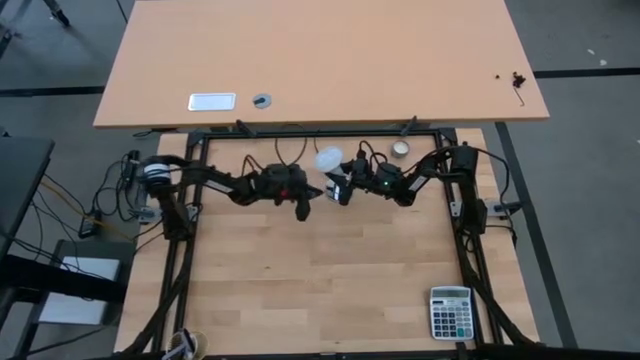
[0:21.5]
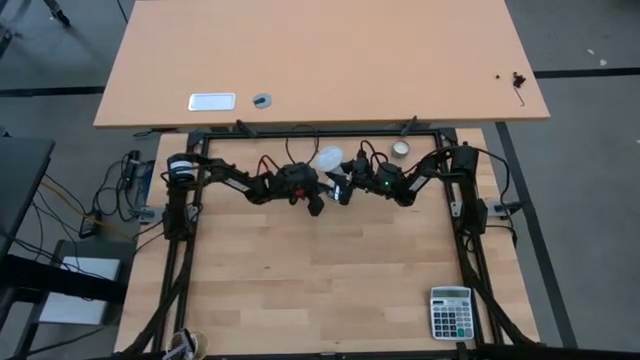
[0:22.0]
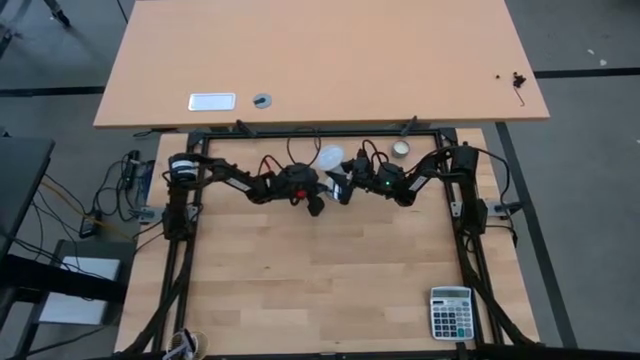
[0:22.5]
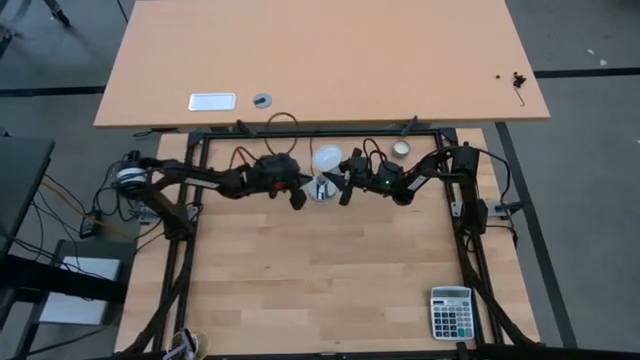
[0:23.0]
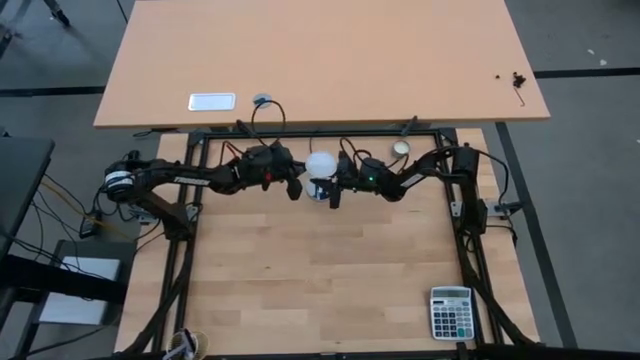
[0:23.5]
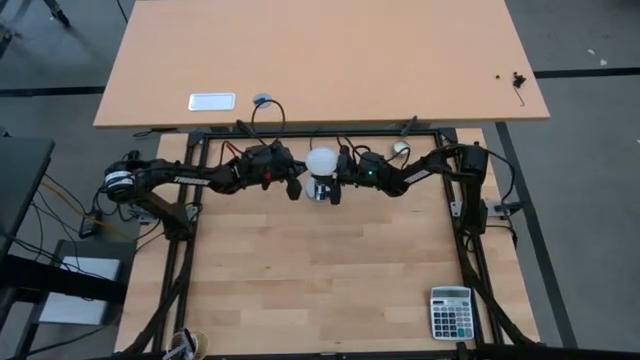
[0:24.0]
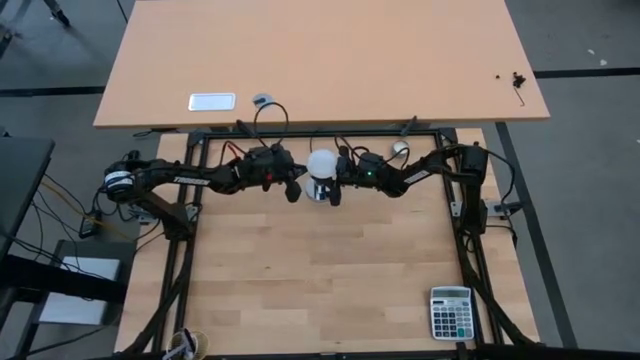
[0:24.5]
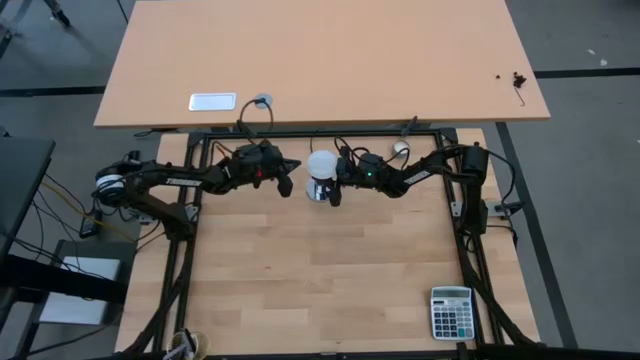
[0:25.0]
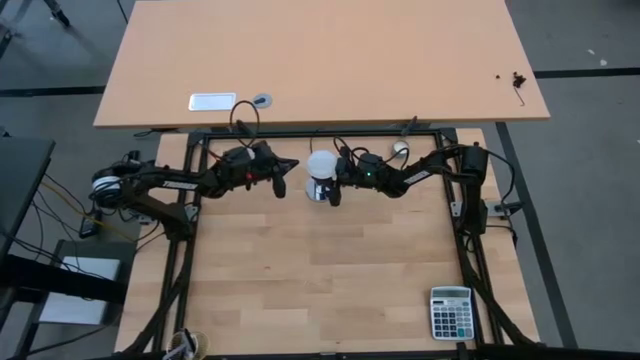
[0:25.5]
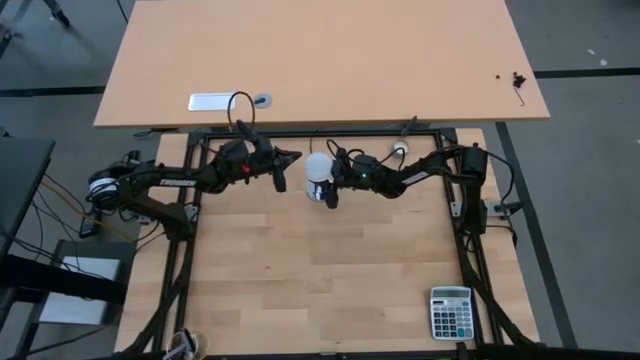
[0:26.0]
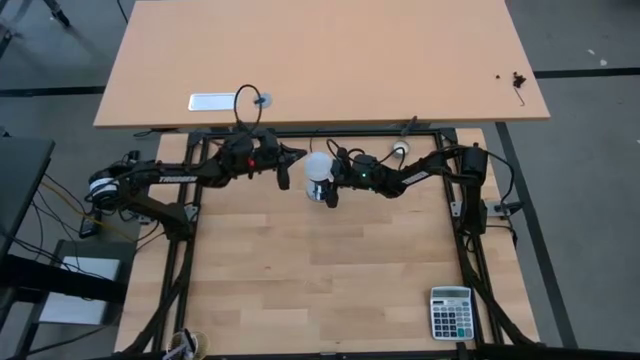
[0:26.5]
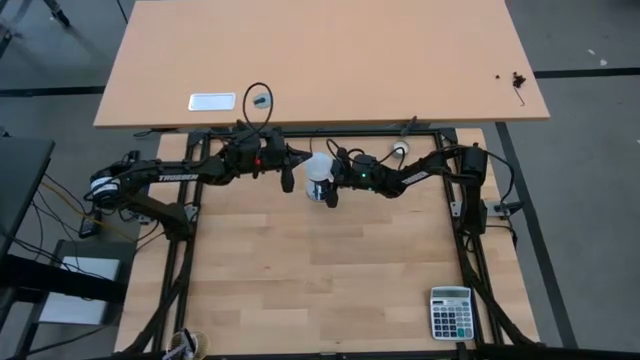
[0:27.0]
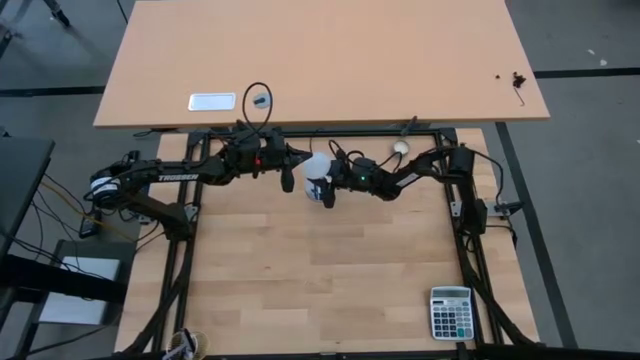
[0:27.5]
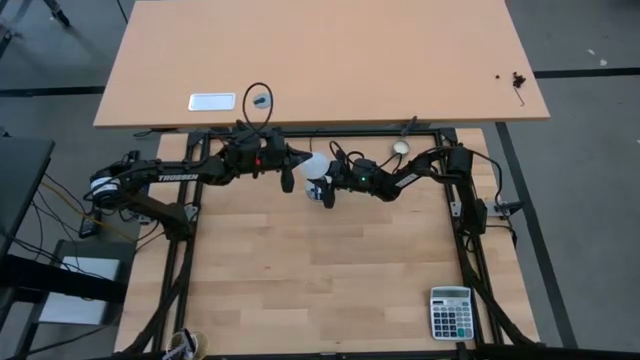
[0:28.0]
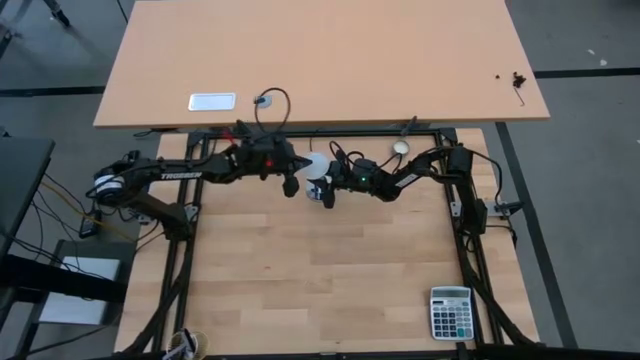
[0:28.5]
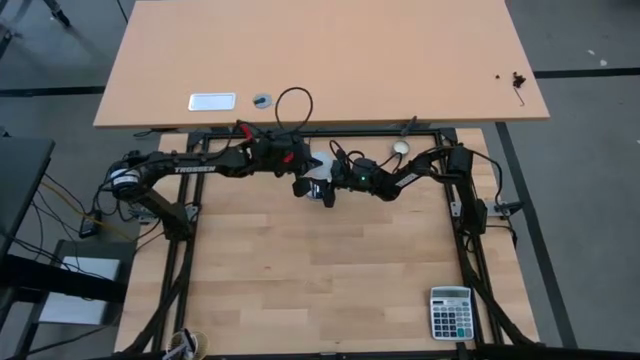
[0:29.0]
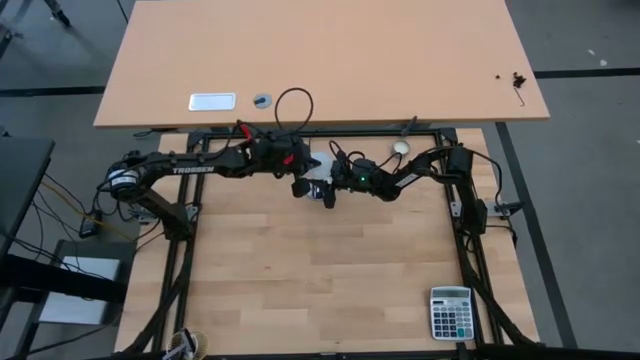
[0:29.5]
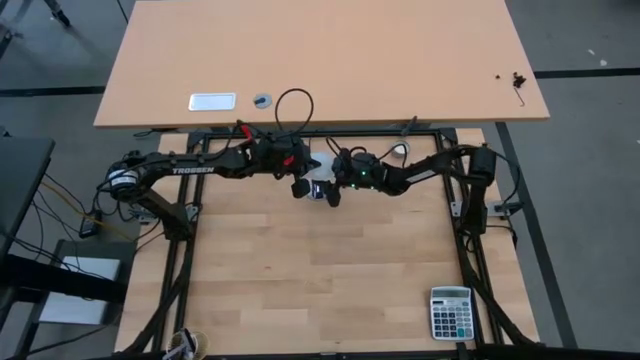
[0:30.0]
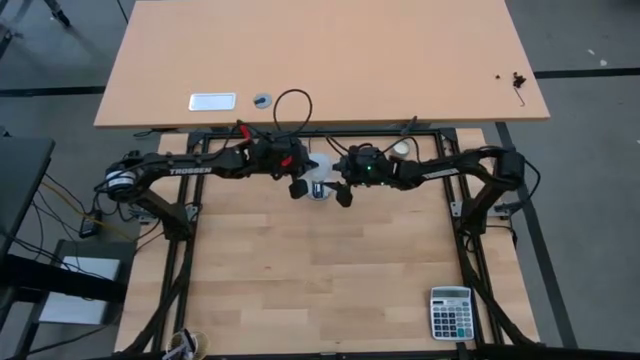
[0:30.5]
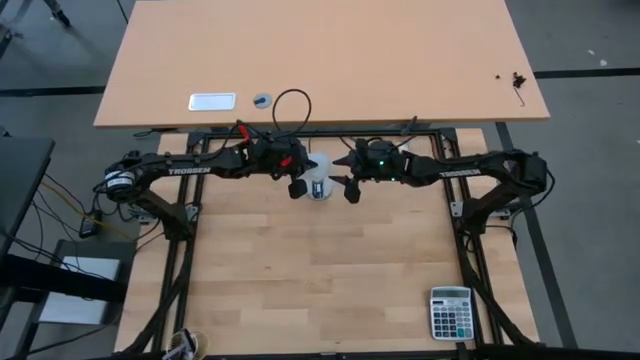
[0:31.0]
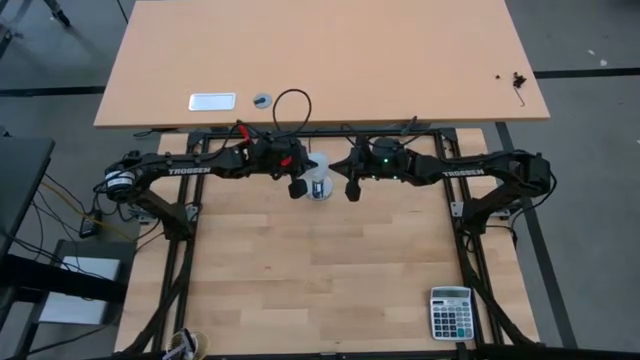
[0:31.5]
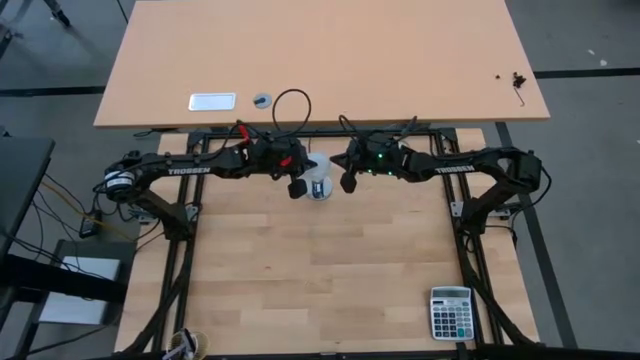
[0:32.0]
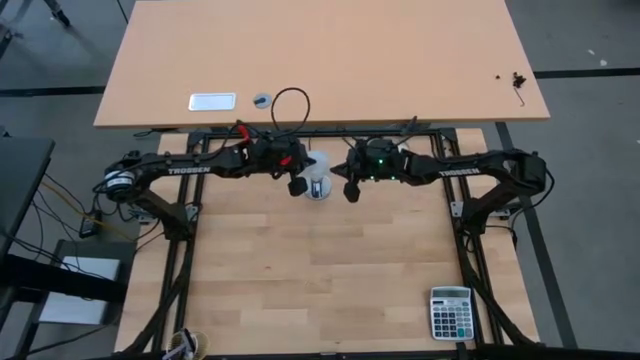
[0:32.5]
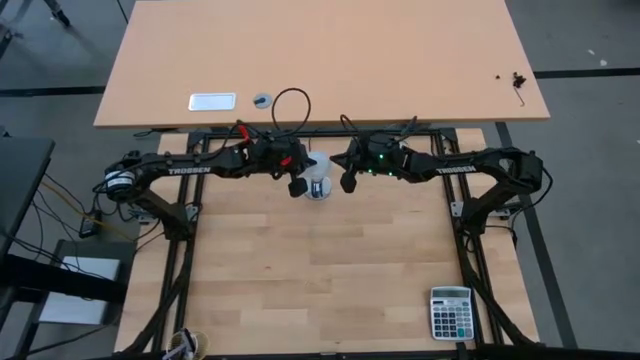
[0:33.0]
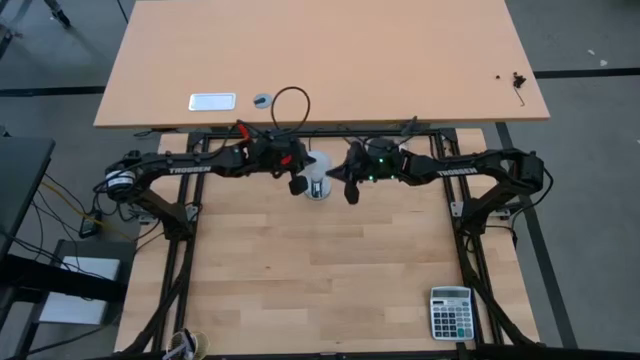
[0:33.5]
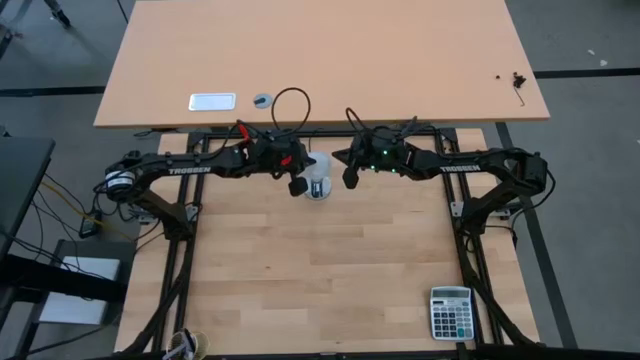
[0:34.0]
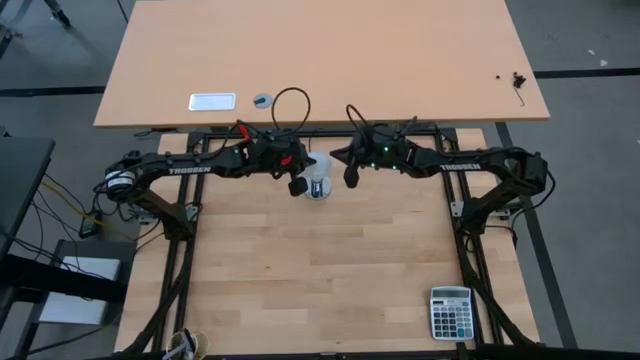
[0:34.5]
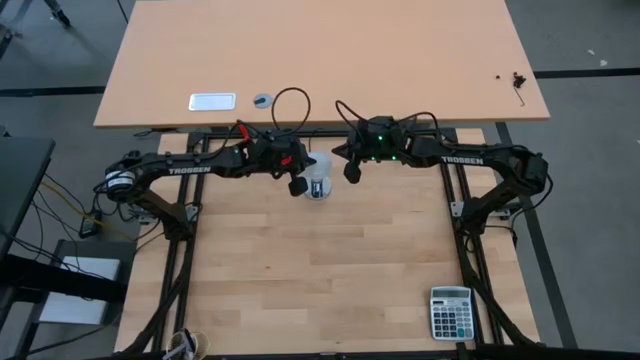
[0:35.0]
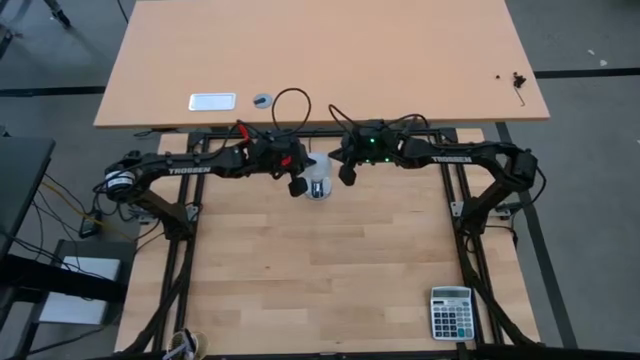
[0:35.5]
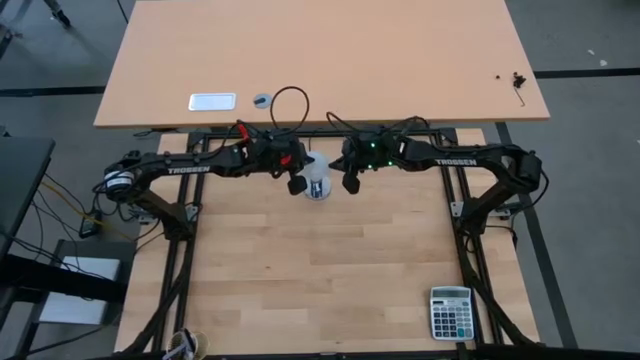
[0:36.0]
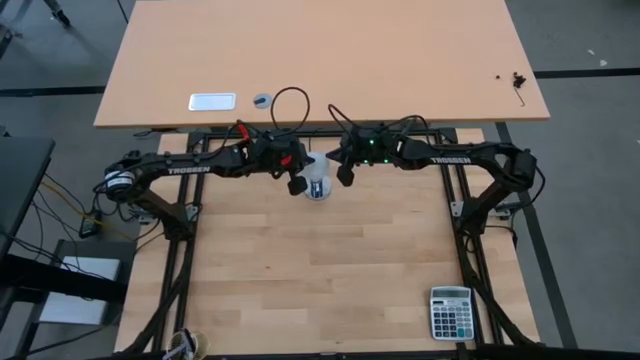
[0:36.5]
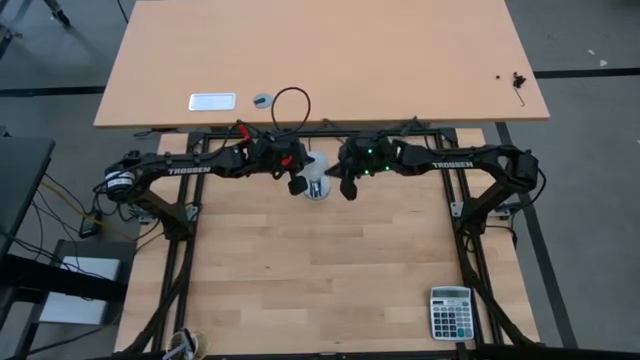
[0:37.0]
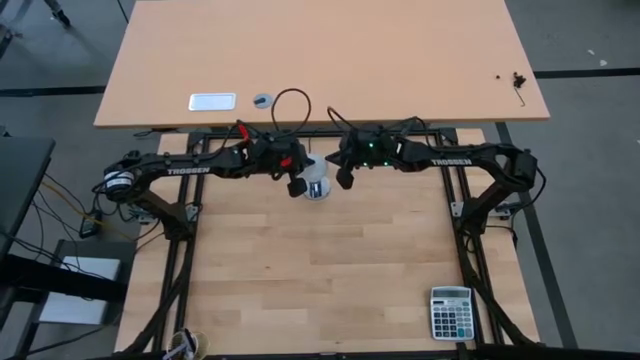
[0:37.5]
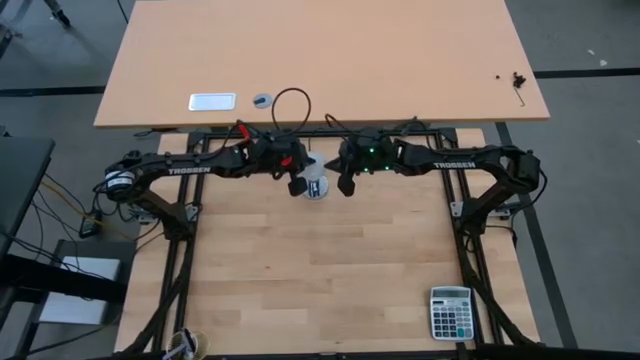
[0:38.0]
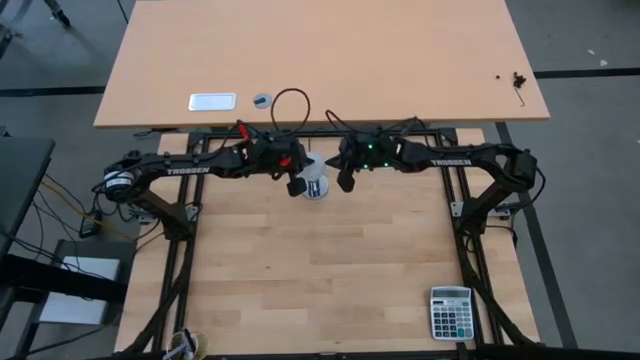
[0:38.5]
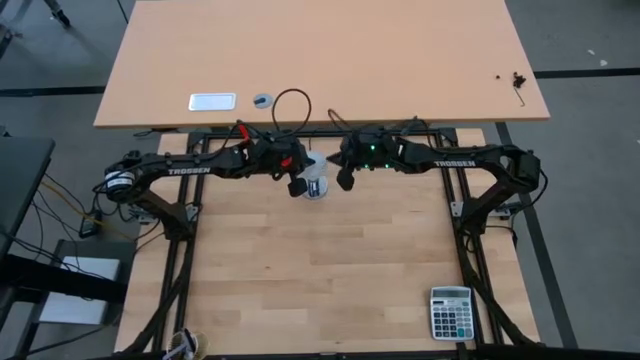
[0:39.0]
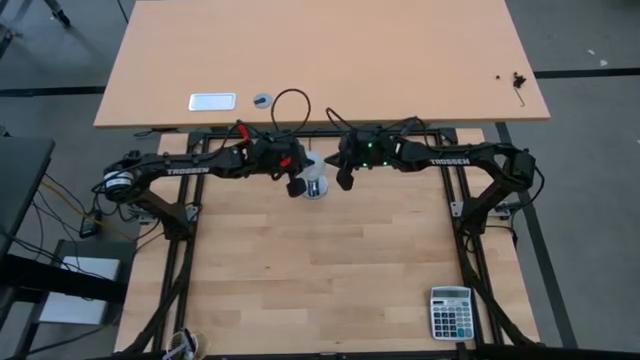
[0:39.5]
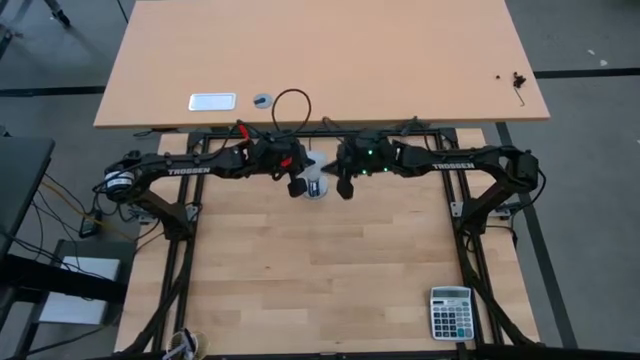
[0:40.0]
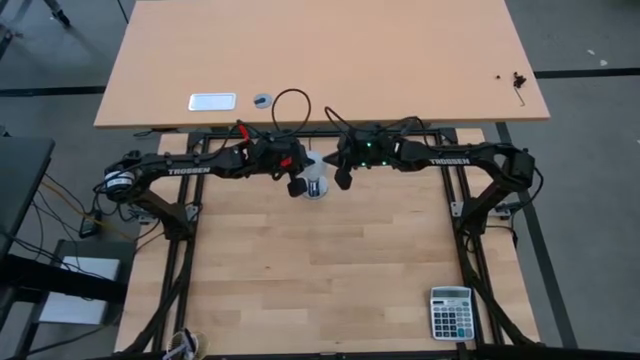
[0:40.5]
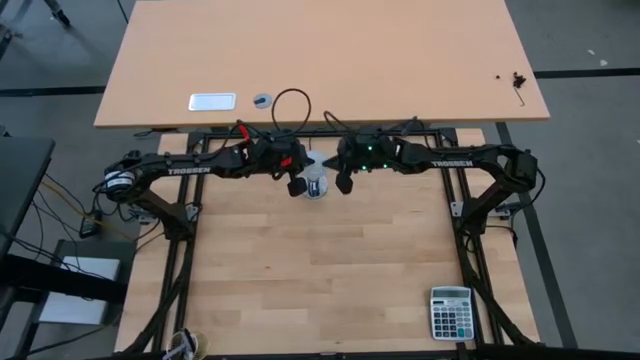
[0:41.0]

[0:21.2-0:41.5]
Task: Screw lightbulb
Insert the light into the lamp socket
